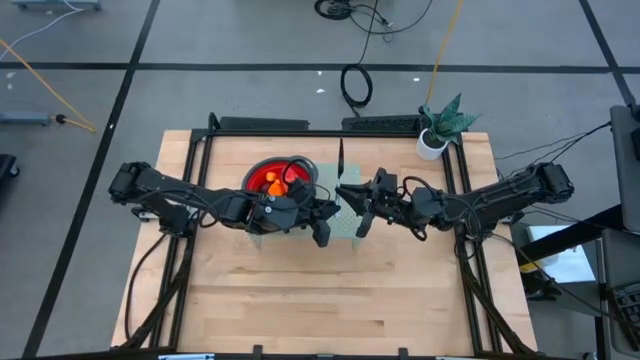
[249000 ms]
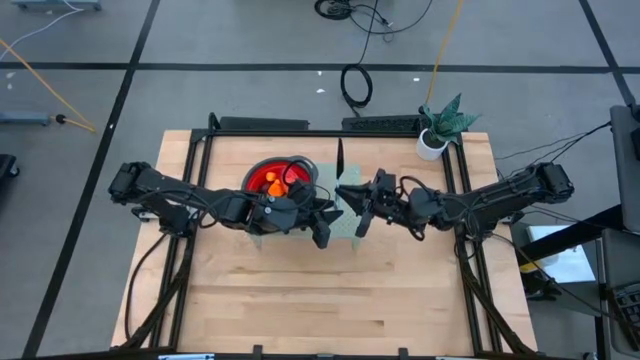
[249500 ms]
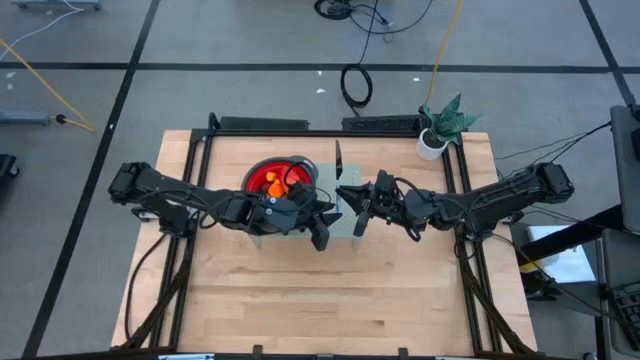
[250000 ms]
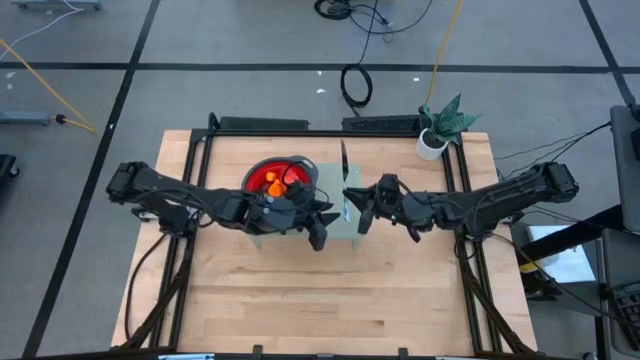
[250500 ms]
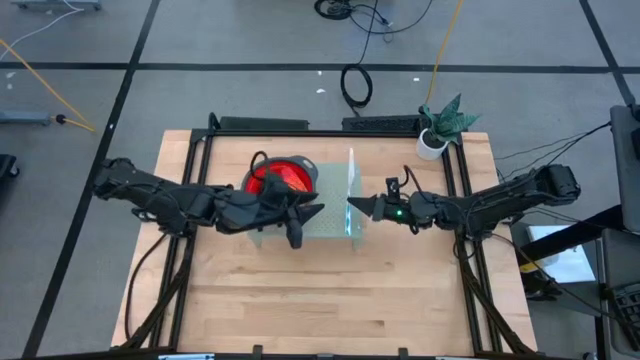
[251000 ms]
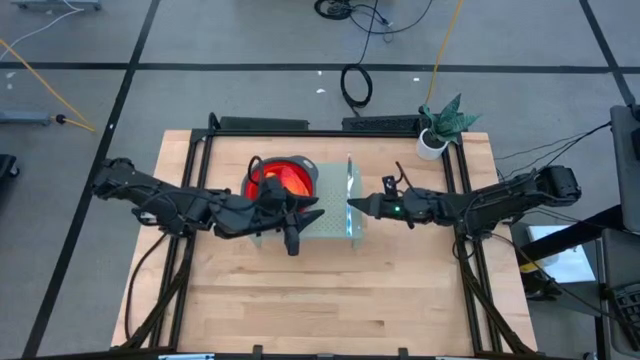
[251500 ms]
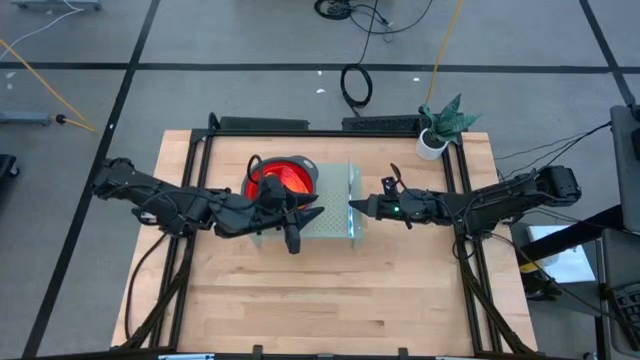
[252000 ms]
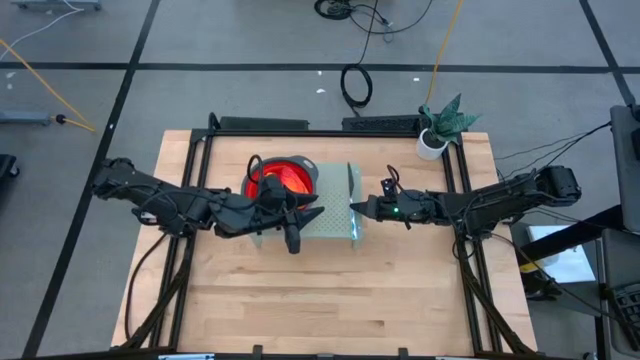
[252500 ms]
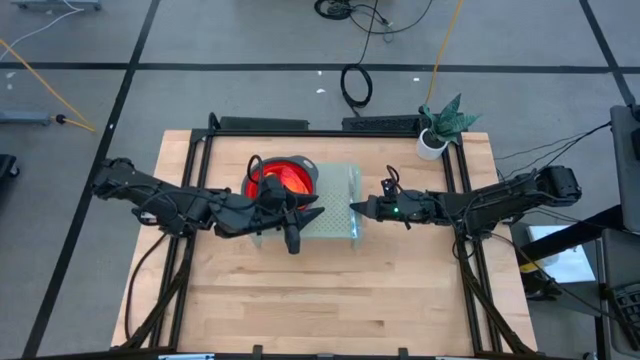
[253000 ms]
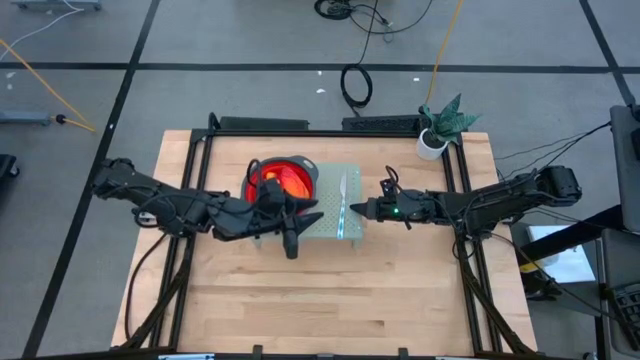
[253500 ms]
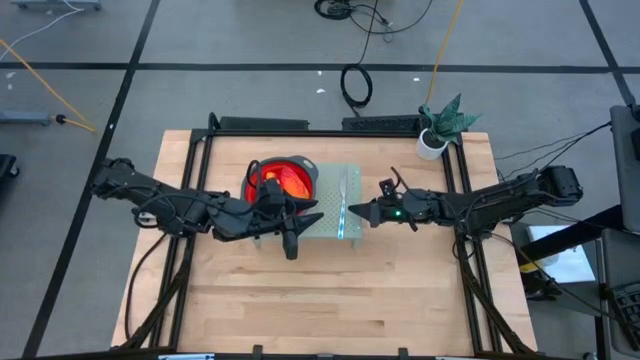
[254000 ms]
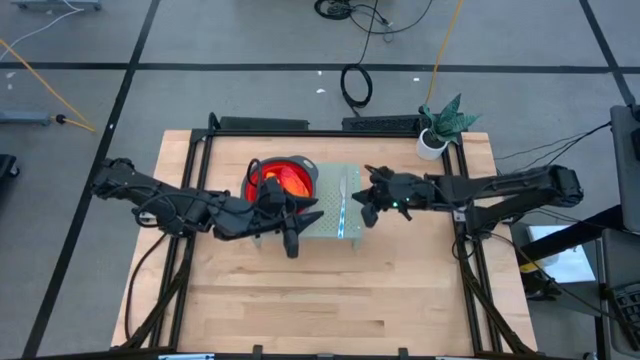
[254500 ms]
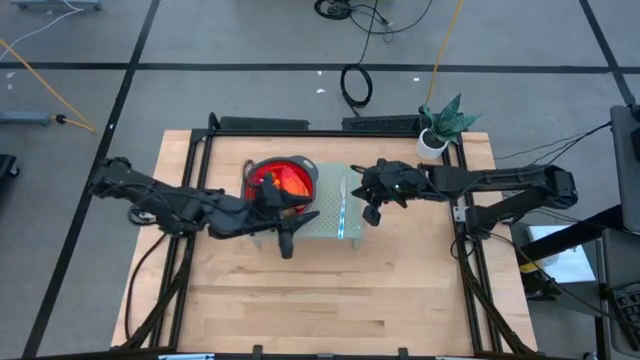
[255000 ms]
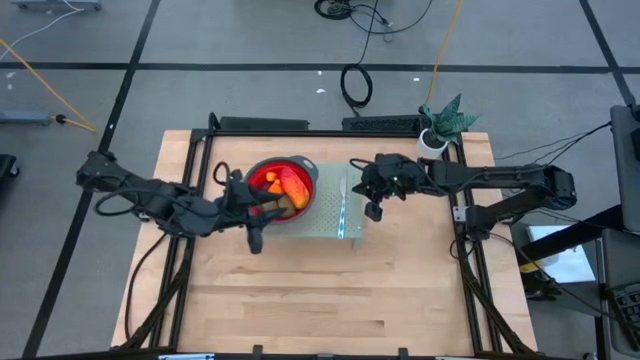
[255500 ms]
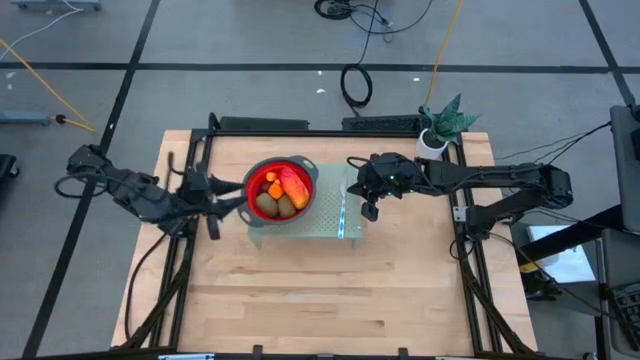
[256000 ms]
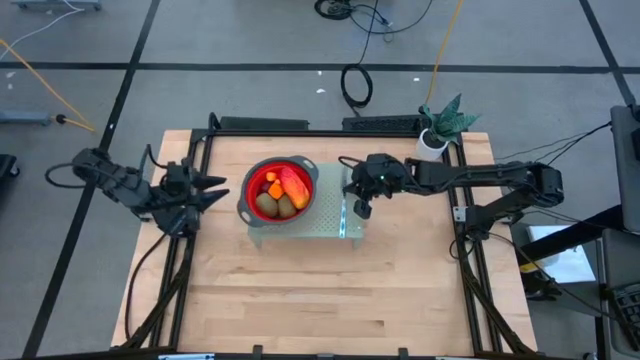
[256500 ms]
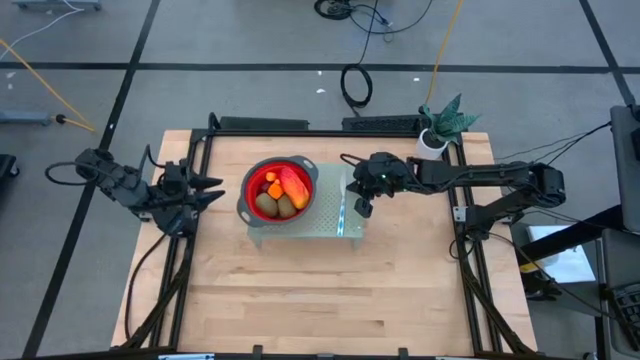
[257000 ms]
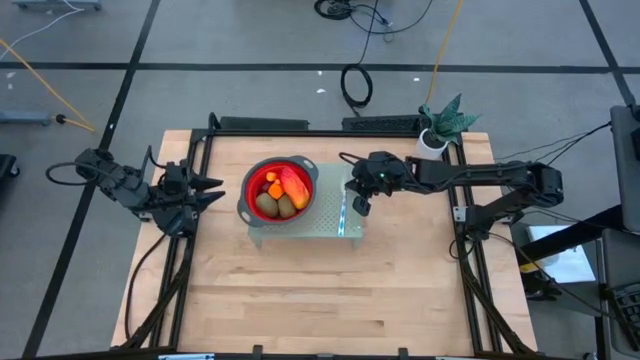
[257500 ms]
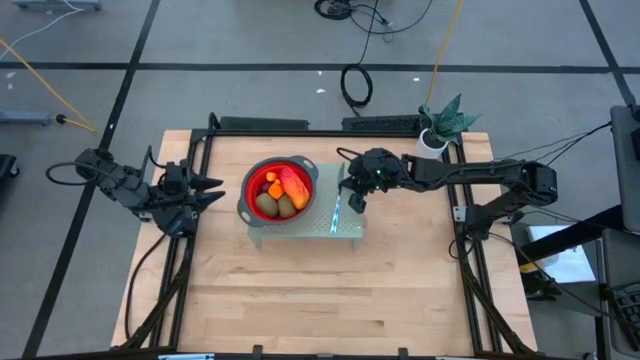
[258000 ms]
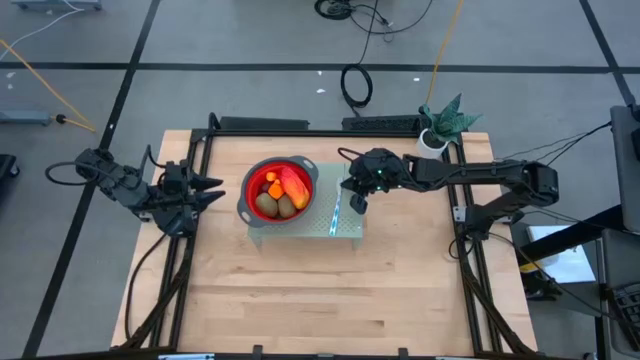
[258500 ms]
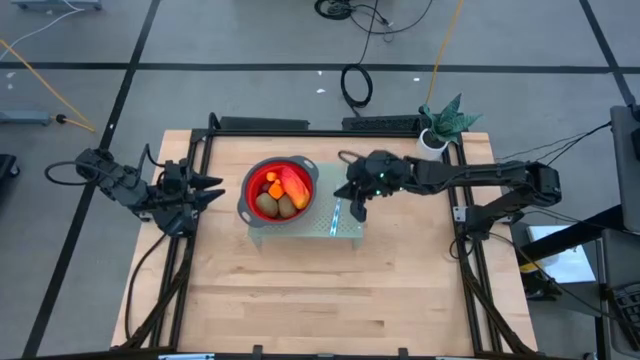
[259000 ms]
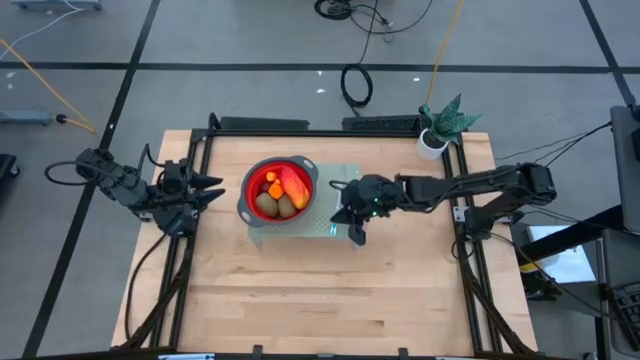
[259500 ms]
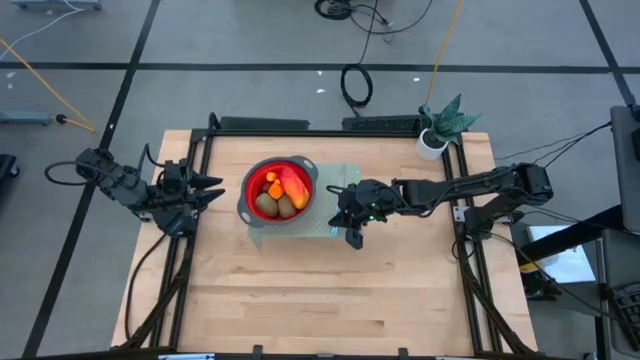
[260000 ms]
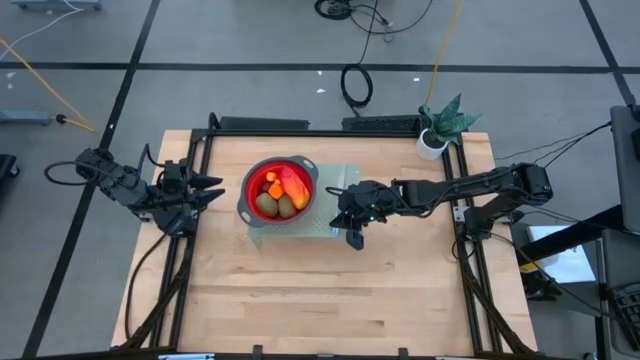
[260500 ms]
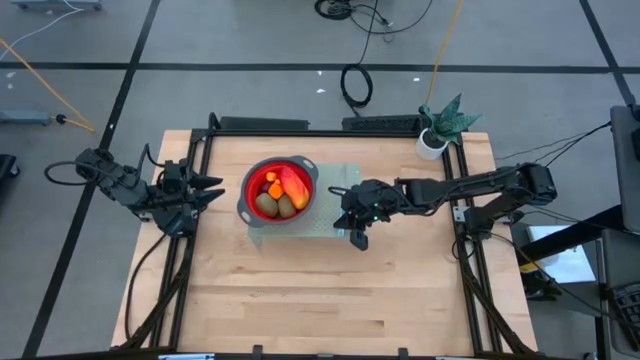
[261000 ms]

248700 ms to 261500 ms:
Task: Pick & Place Fruit
Put the knife onto the right side of the shelf

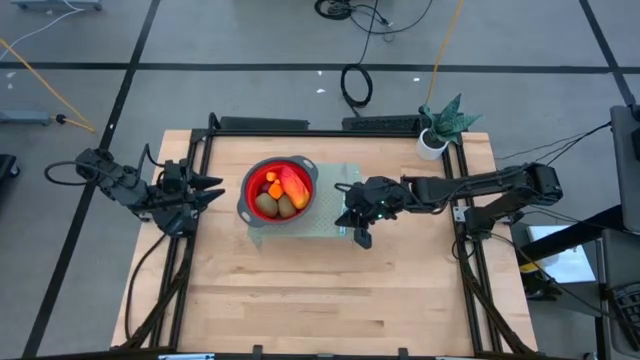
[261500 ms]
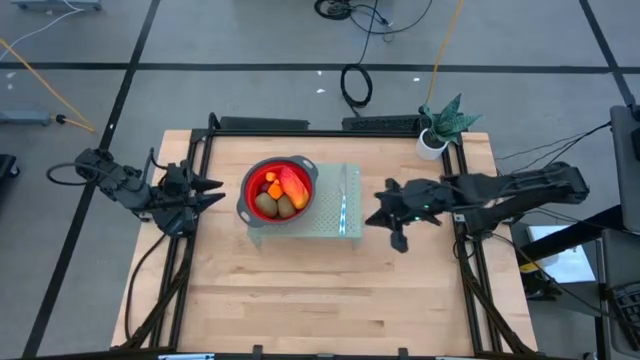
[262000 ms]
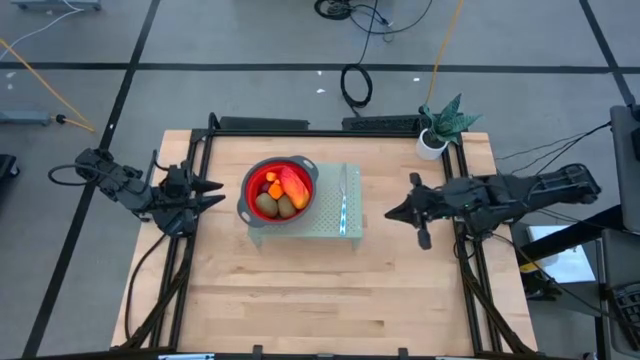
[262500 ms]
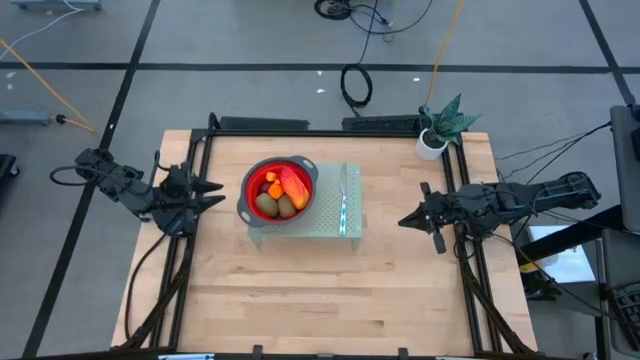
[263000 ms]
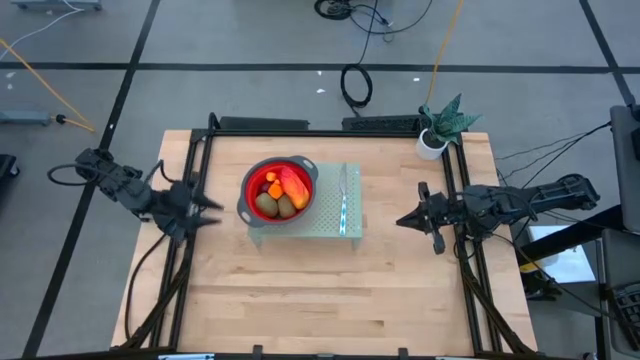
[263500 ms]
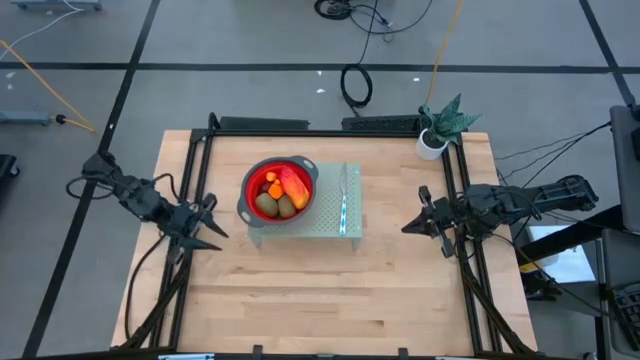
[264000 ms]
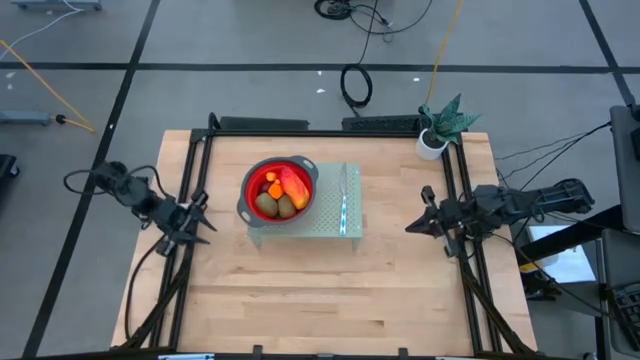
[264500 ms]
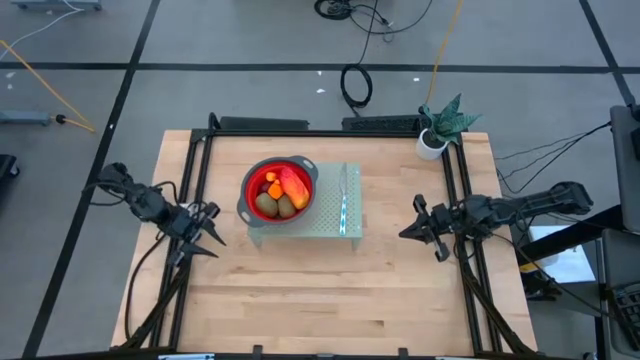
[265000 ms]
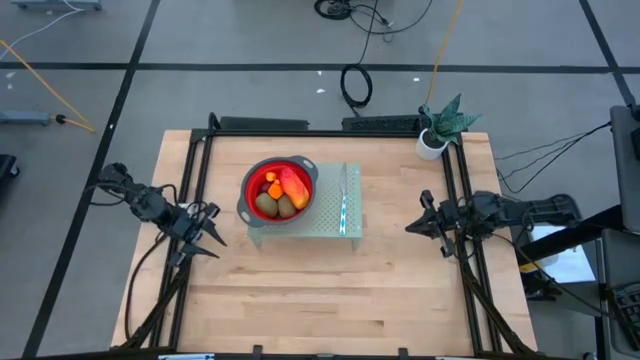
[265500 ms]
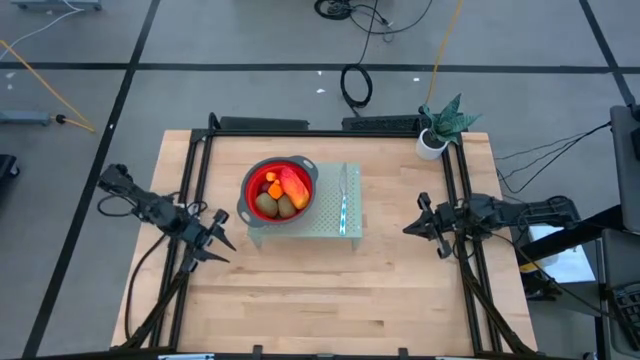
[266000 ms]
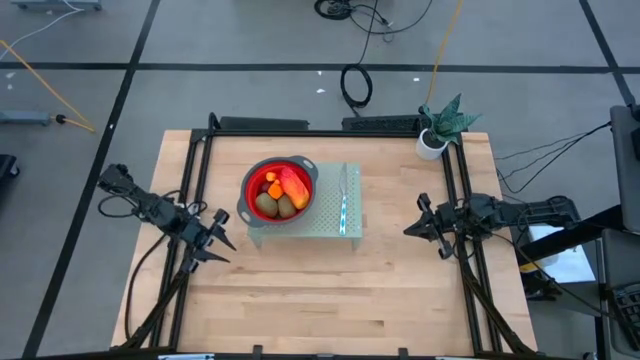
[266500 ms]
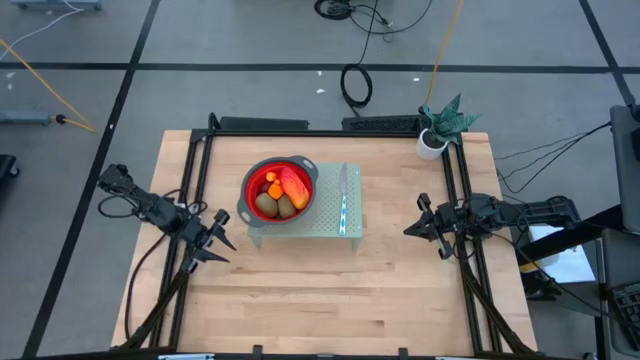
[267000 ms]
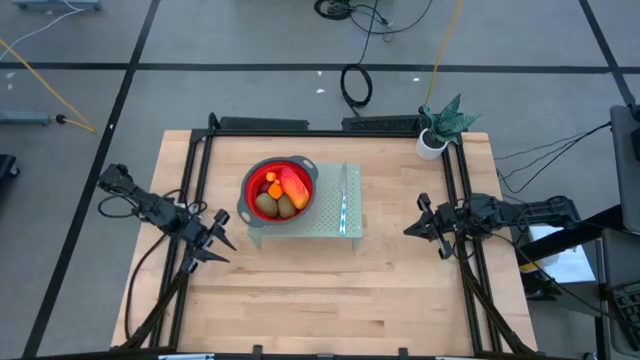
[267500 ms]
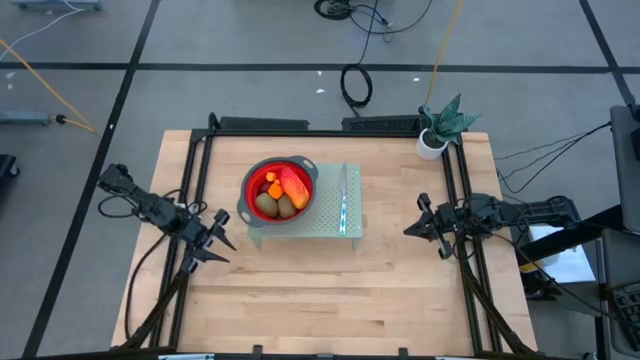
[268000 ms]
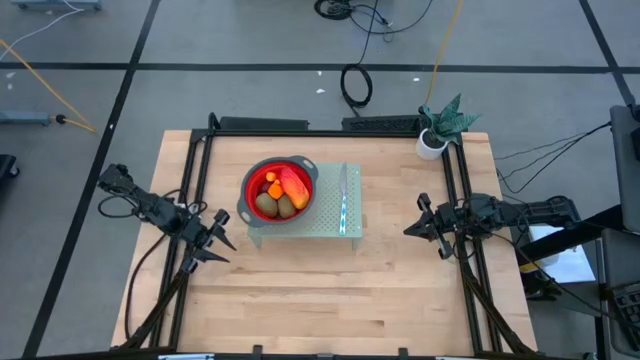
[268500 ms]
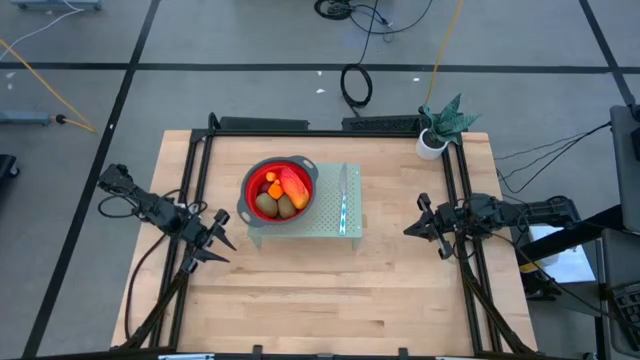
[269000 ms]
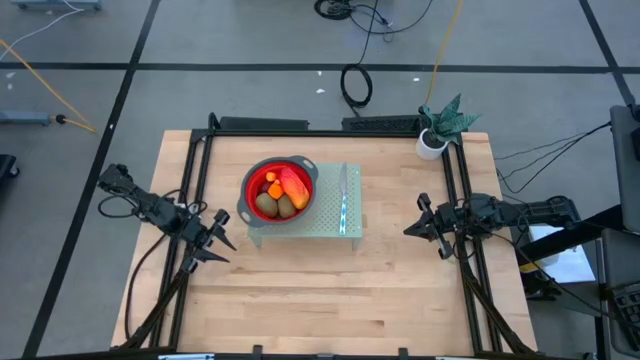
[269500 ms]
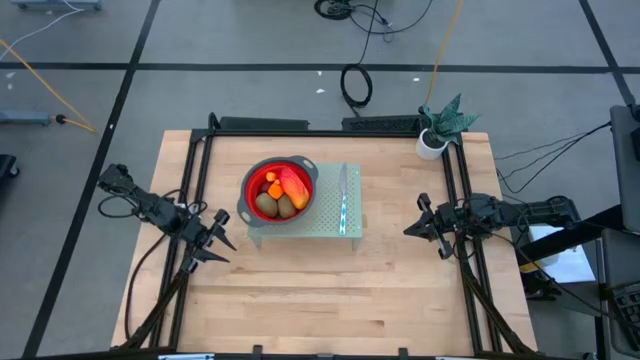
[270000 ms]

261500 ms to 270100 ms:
Return to Home Position

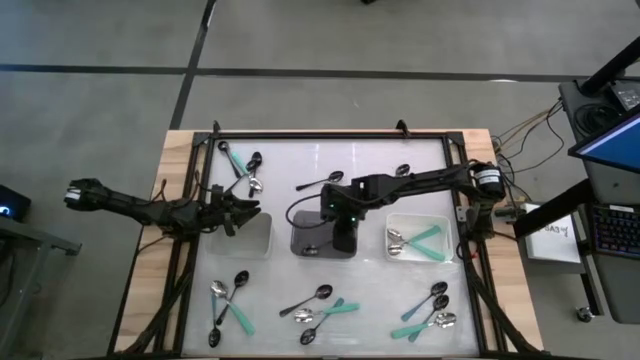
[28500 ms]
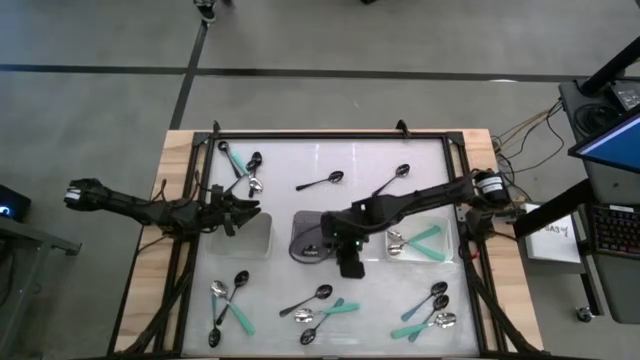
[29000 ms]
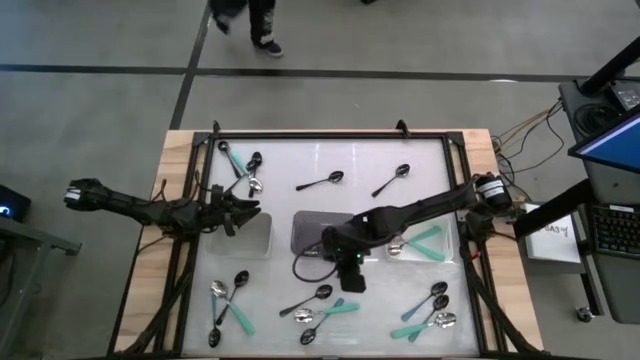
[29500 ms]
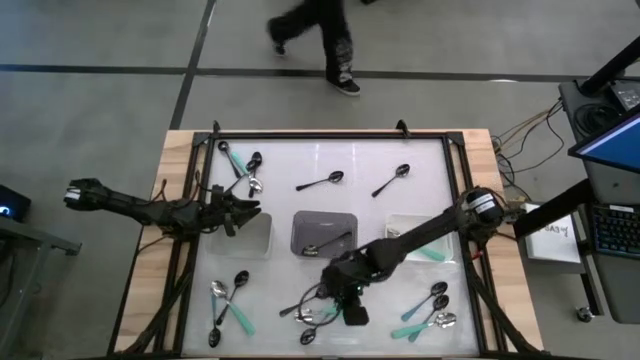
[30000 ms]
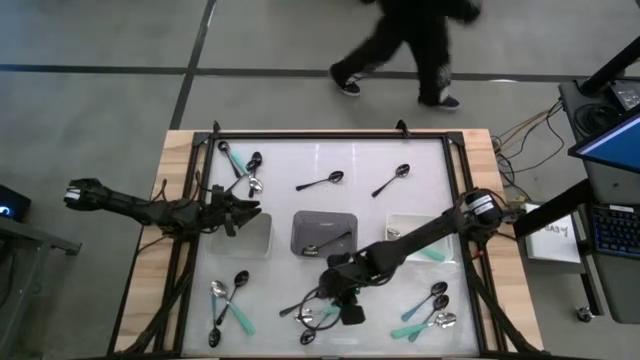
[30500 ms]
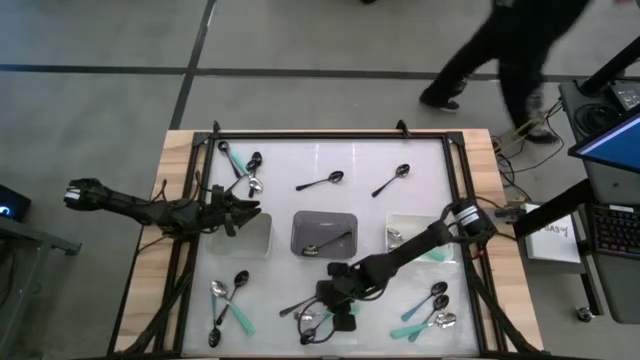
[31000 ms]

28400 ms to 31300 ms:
Task: Sort silverware by color (type)
Put the green spoon into the white bin
